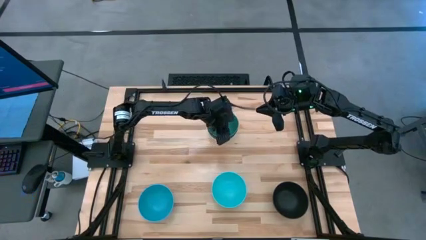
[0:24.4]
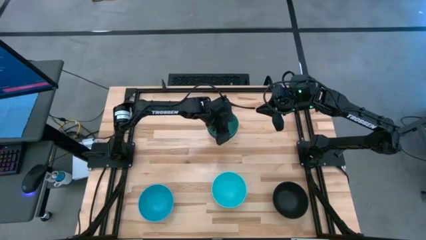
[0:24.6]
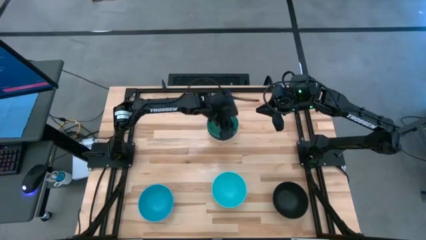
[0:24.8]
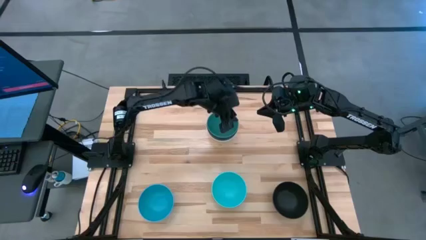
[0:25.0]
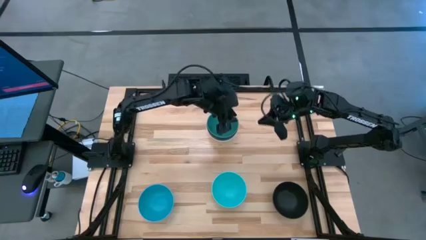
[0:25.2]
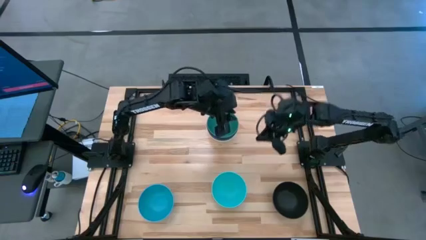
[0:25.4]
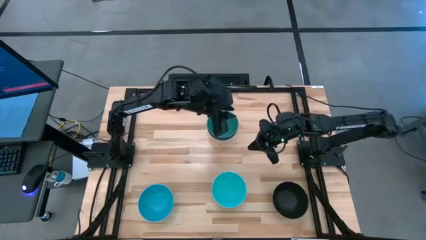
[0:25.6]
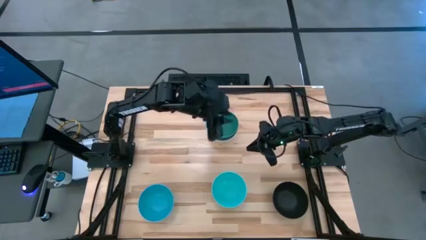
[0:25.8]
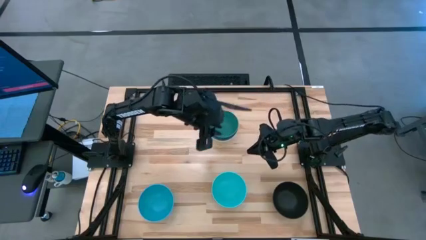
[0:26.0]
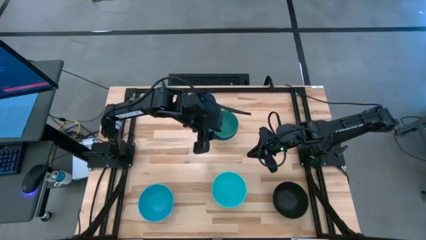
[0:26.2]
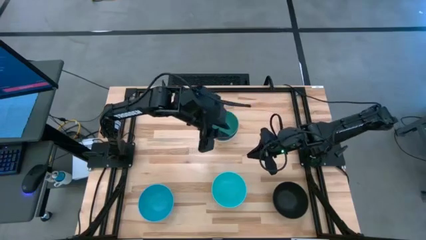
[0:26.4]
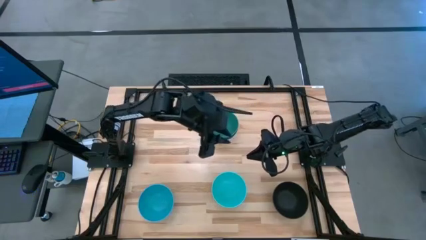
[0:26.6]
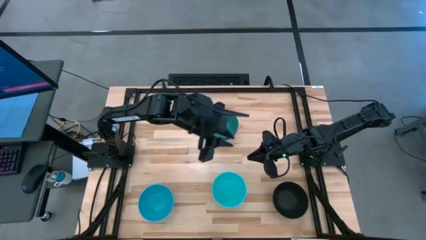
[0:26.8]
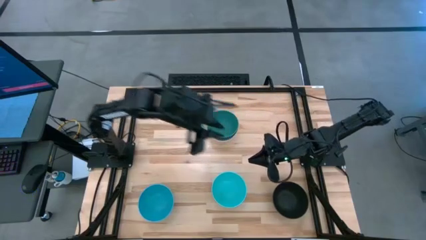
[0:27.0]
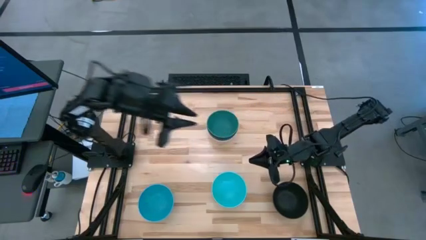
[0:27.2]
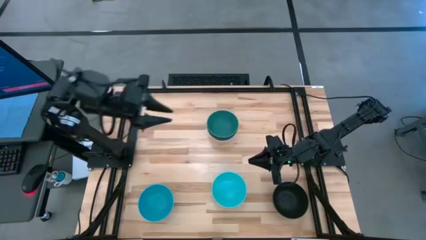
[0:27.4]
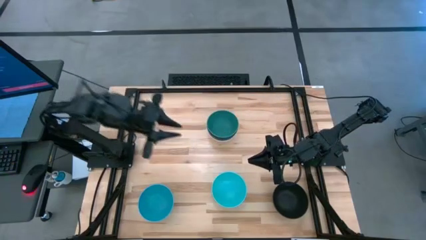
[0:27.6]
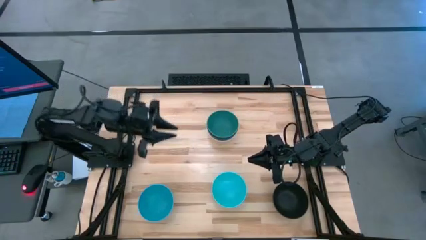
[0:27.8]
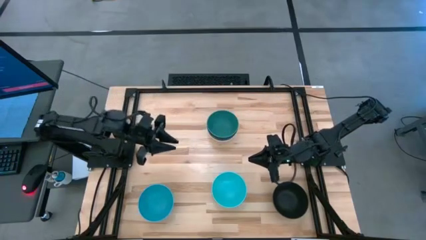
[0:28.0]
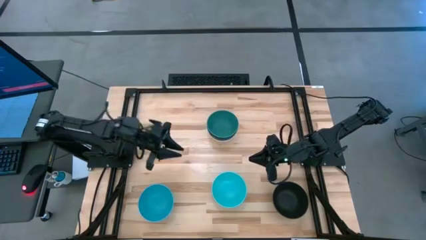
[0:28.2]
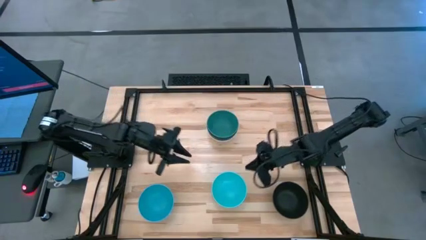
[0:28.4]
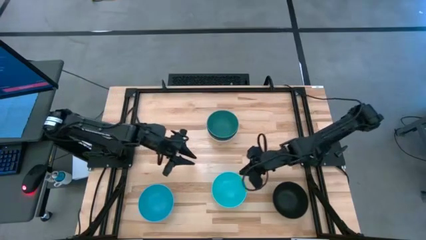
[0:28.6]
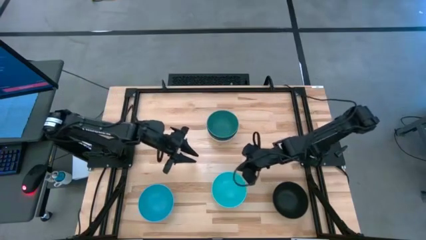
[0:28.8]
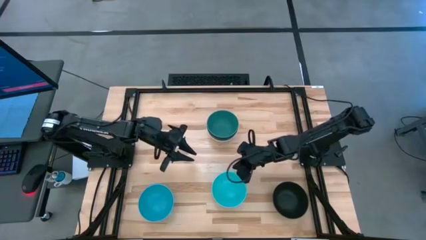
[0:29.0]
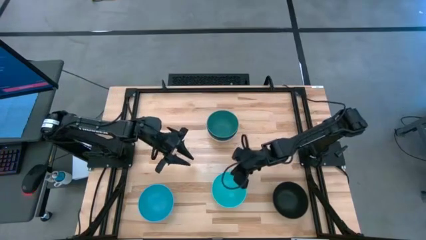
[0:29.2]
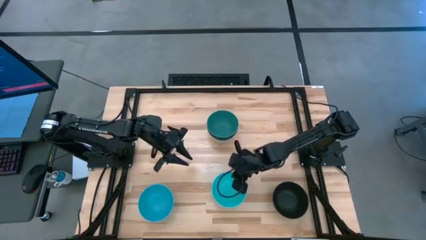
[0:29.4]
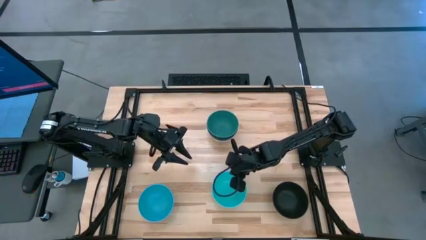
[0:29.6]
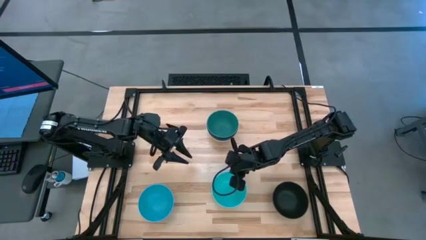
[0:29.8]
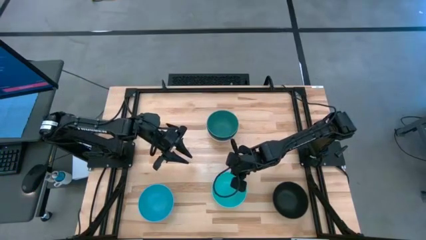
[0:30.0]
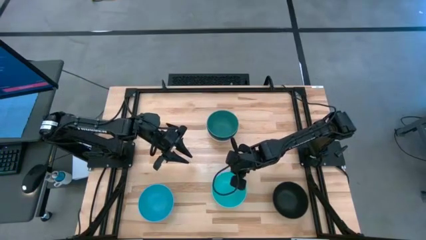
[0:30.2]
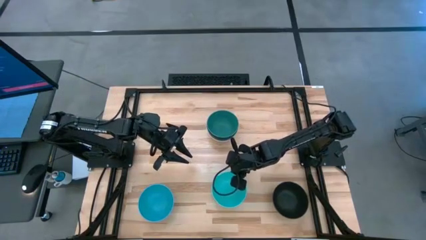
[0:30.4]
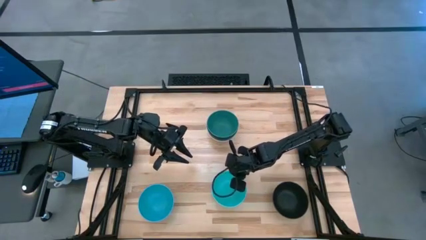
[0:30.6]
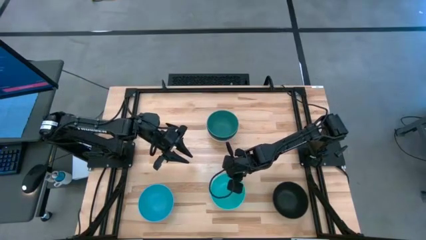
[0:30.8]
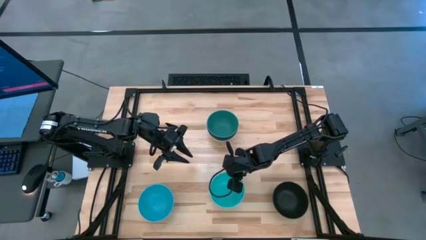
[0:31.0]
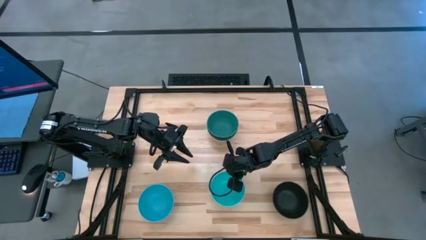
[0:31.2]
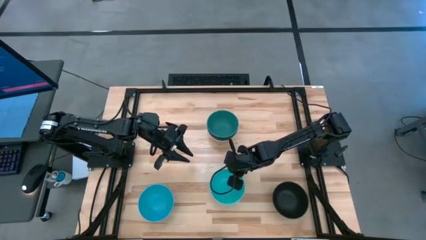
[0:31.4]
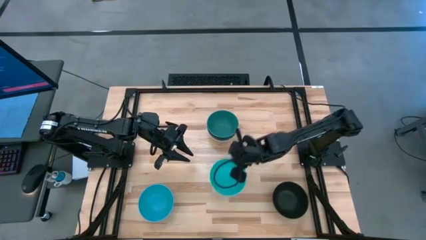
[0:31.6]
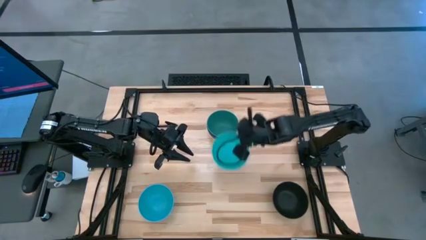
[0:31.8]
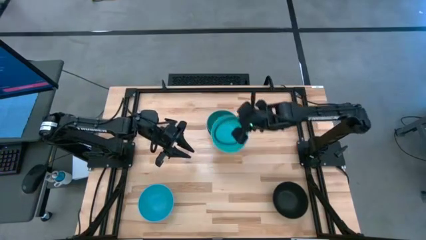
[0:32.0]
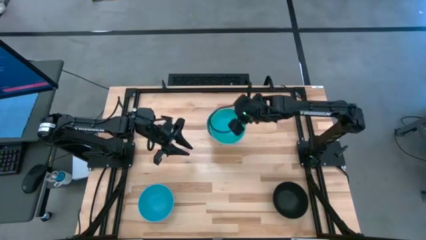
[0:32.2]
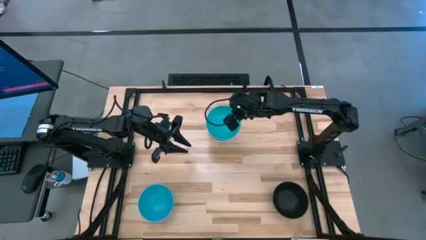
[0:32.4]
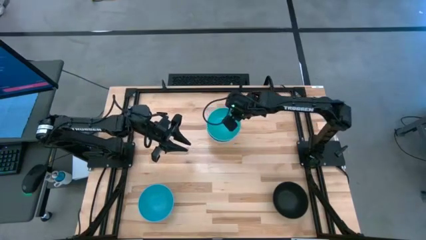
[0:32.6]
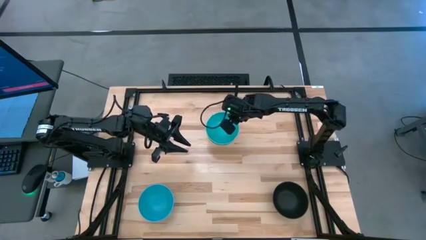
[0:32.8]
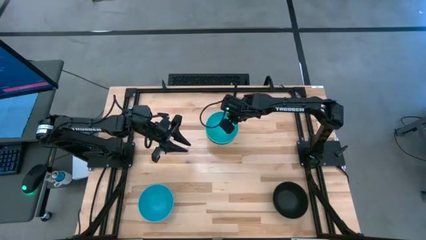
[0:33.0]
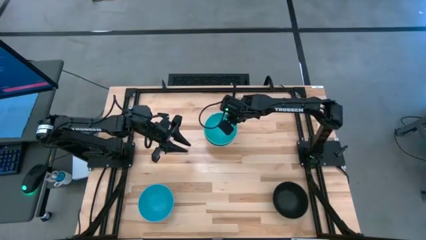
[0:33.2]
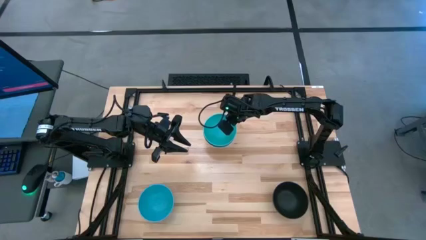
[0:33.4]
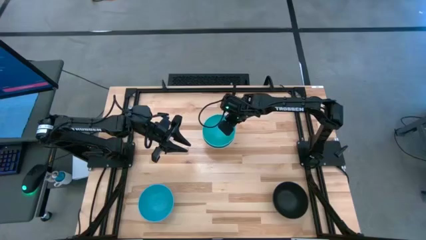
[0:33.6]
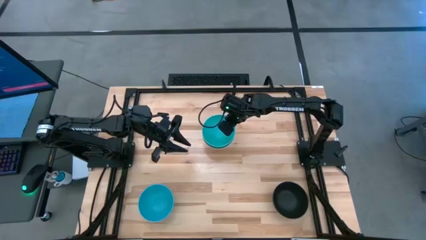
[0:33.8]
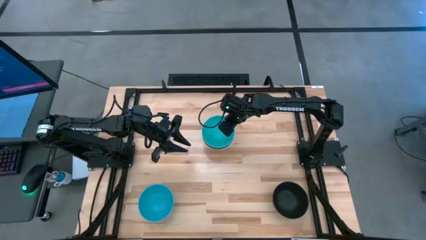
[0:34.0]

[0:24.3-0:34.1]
Task: Nest bowls inside each other
Stack the right blue bowl on the green bowl
